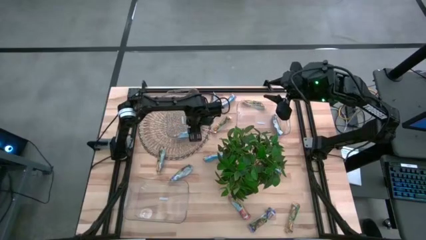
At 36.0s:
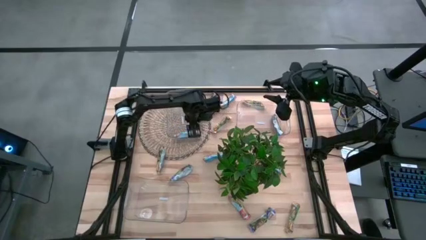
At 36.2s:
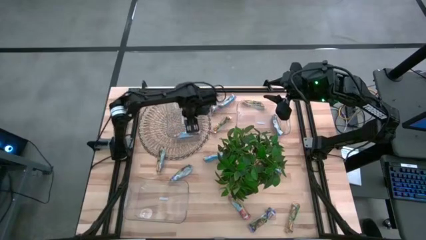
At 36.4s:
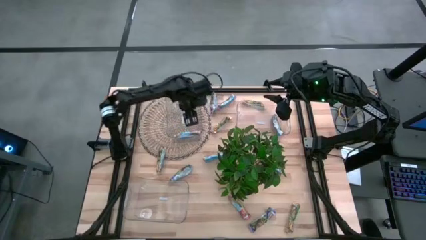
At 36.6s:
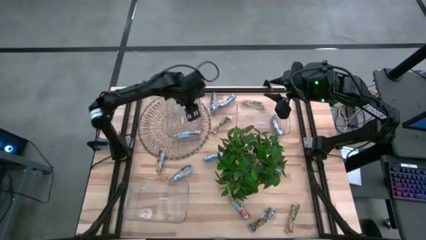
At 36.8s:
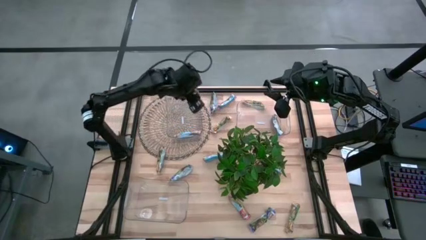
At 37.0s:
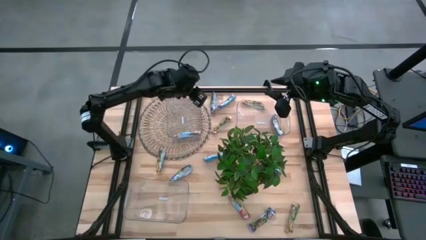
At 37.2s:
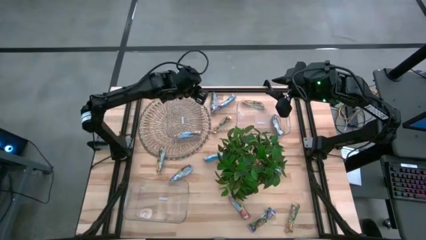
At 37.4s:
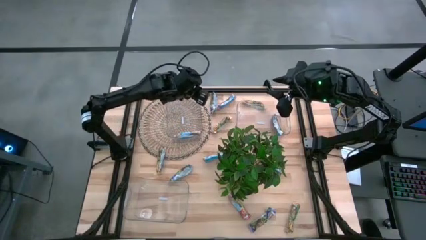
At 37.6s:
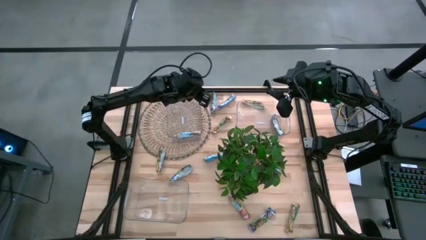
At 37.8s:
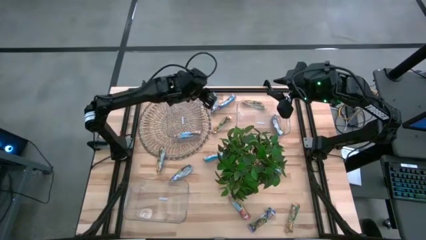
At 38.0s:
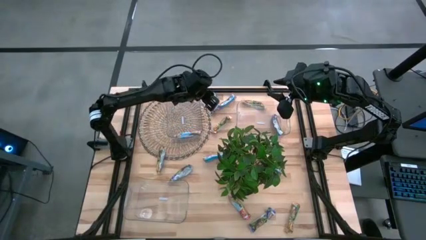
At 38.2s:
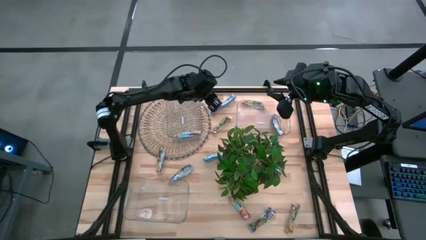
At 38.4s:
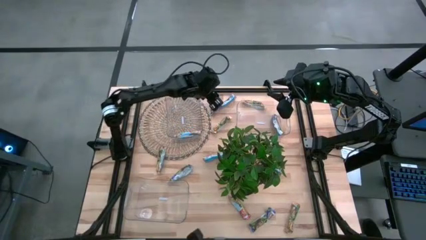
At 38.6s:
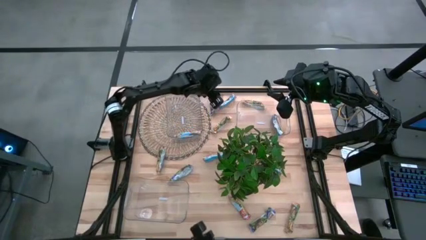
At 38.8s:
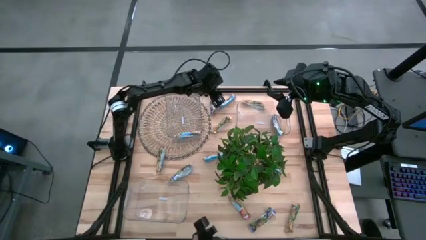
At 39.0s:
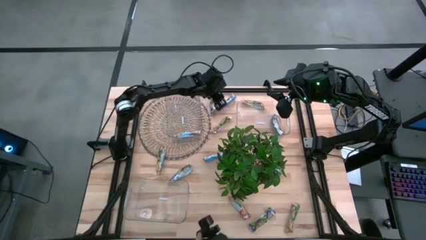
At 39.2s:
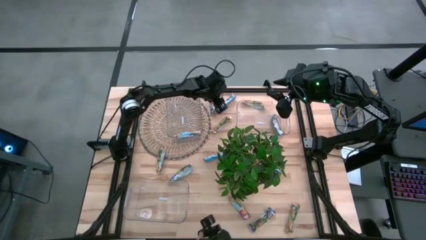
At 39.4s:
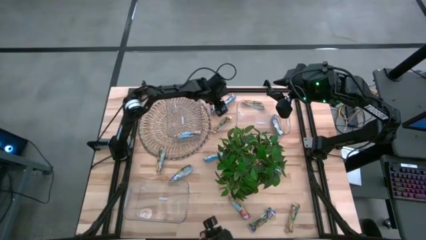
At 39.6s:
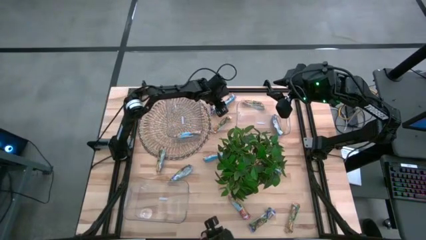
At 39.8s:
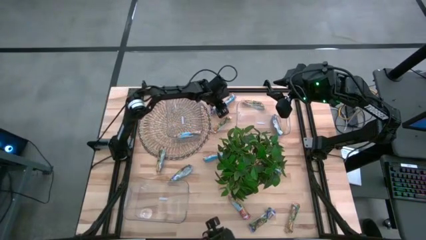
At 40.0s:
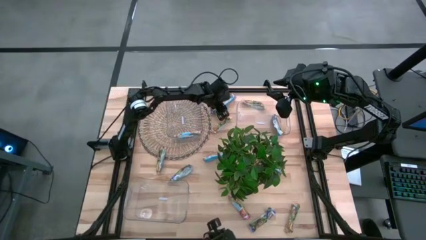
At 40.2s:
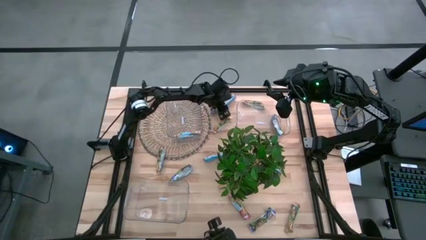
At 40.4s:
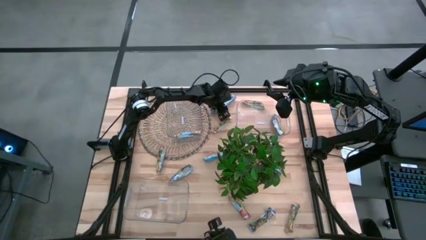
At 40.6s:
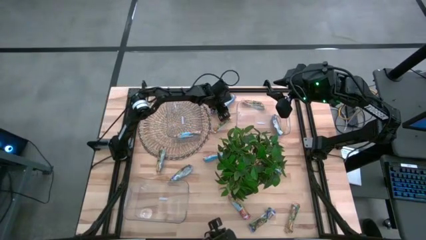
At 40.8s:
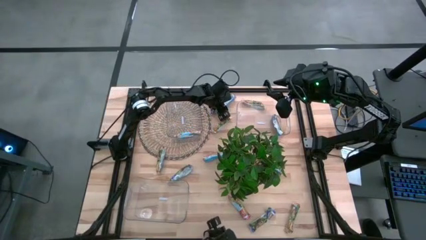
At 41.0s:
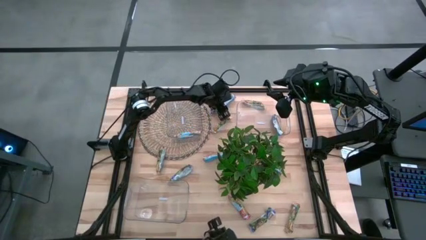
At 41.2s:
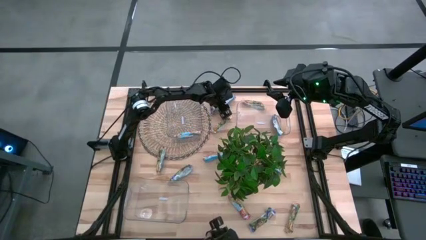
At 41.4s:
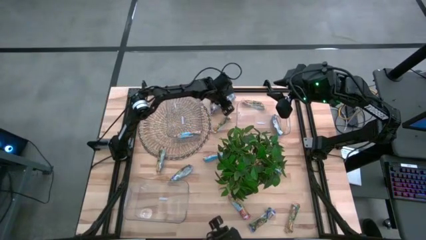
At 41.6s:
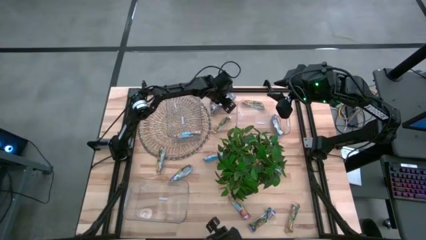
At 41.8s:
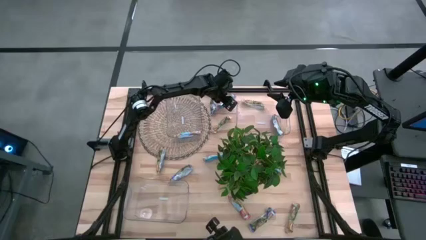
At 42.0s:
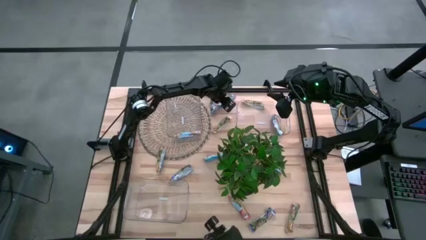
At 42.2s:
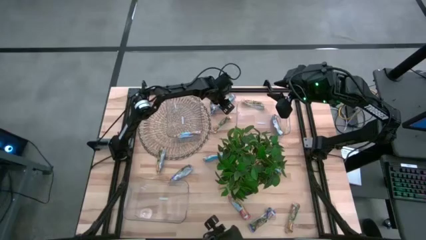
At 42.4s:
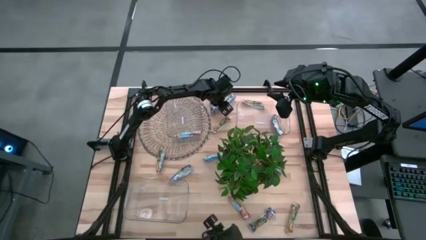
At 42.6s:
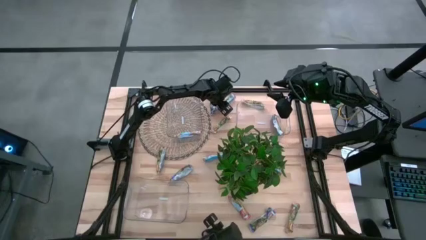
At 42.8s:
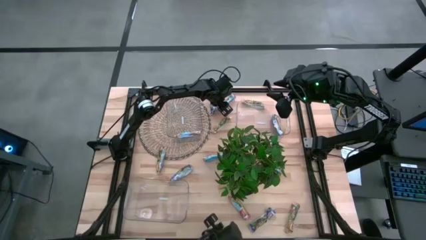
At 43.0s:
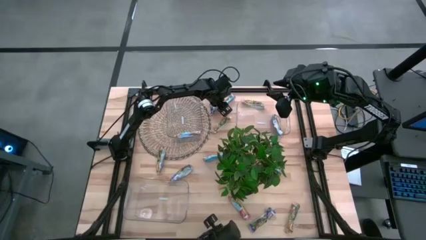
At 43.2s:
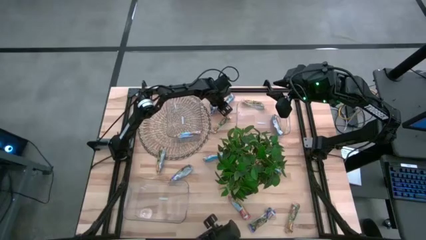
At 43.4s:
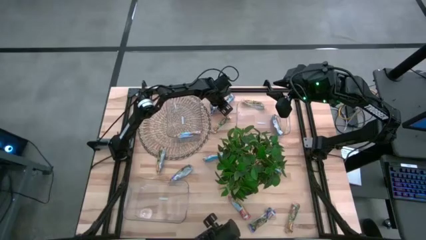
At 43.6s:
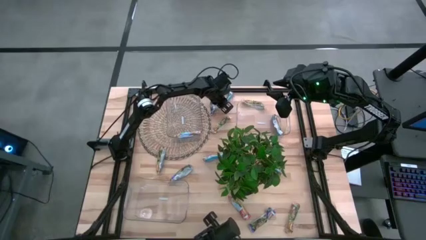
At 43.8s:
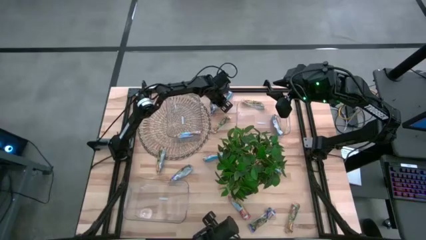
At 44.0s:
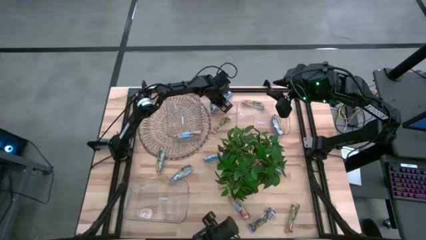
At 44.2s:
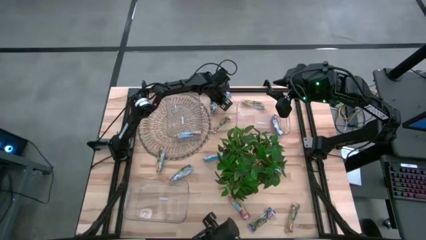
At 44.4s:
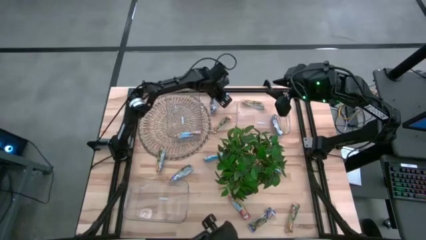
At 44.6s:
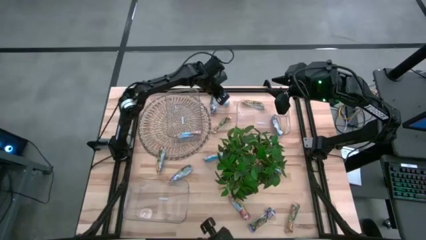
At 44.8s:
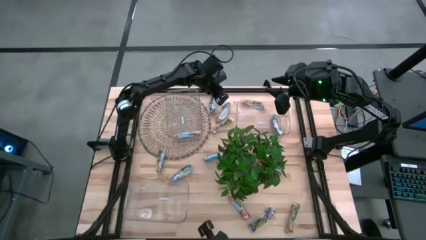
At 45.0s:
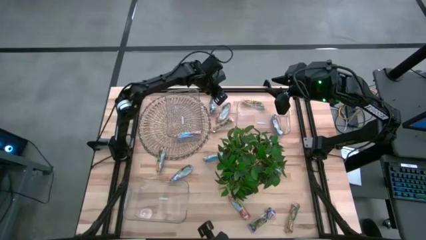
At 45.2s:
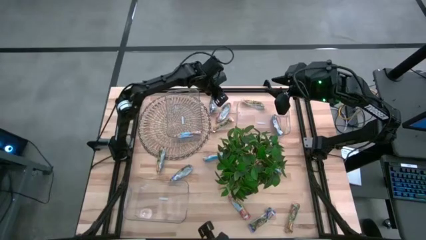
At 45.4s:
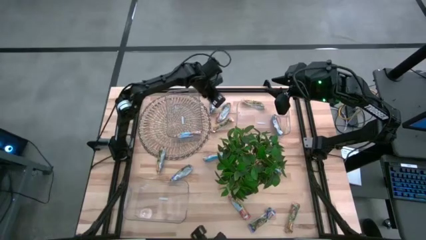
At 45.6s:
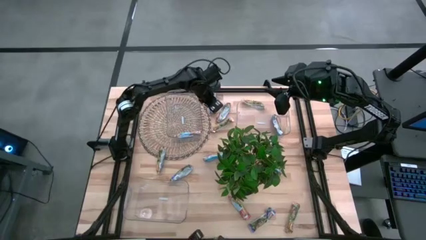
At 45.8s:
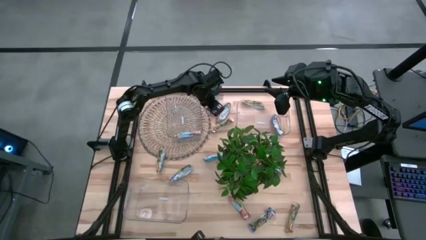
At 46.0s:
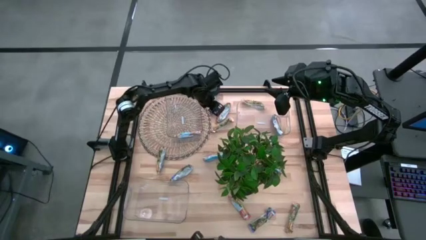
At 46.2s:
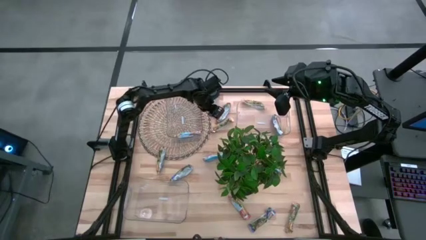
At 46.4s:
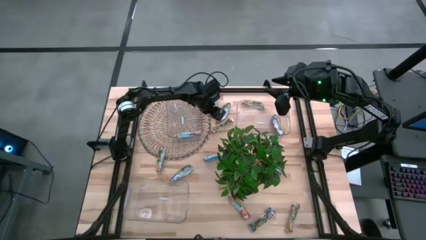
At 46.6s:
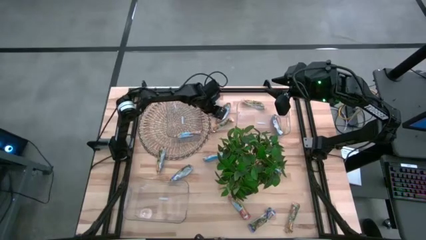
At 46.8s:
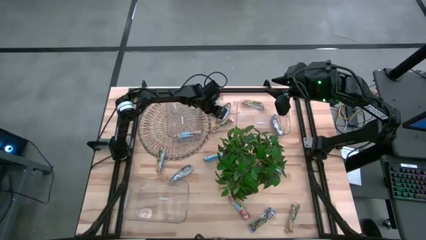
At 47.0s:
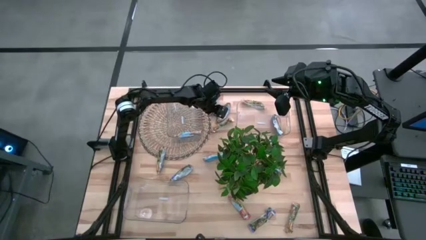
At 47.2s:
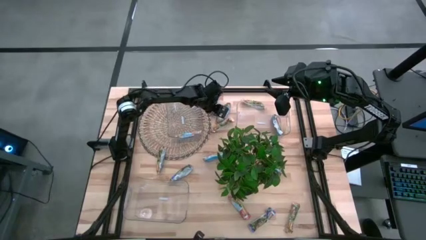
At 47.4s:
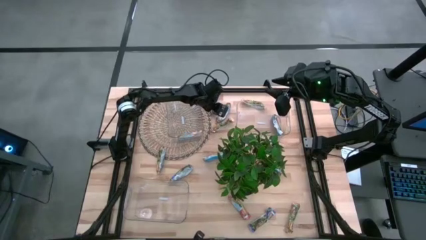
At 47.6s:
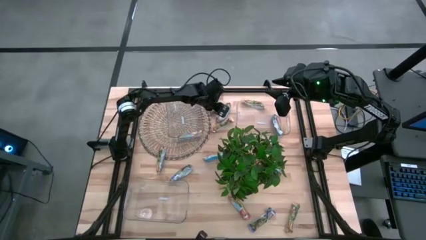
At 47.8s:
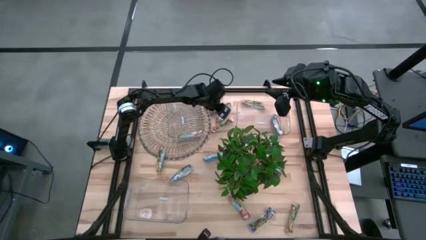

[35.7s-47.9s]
Task: Pick and place Granola Bars by type
Put the top red granola bar into the top right transparent bin

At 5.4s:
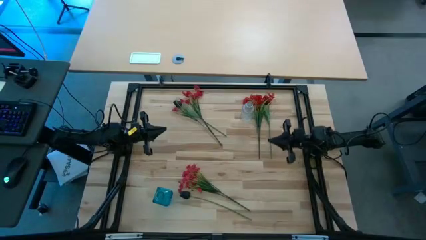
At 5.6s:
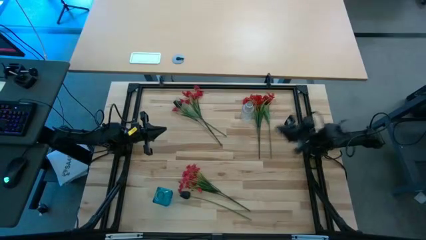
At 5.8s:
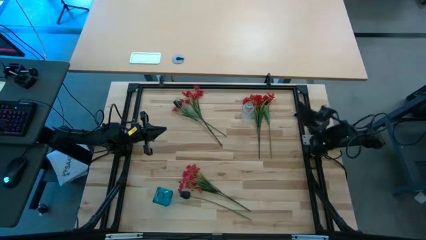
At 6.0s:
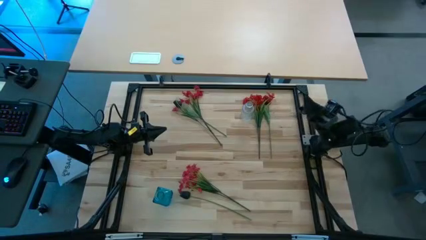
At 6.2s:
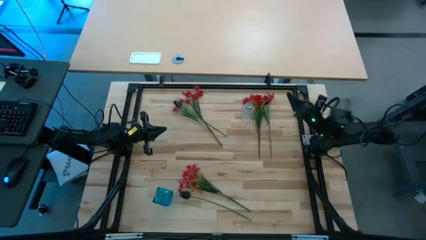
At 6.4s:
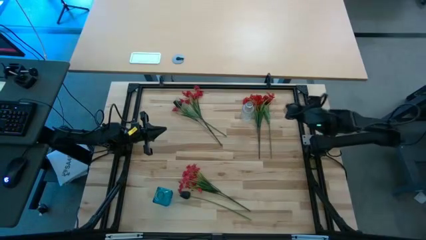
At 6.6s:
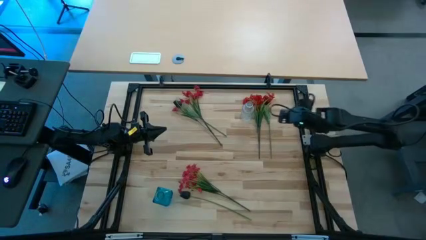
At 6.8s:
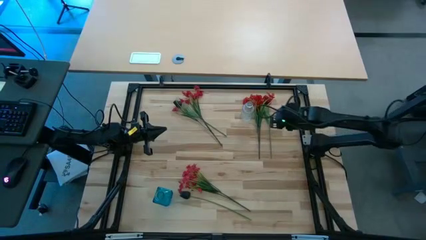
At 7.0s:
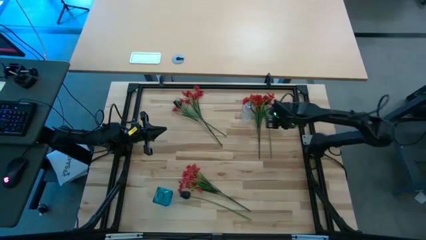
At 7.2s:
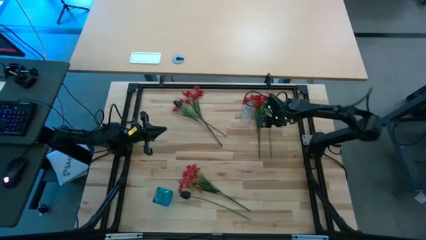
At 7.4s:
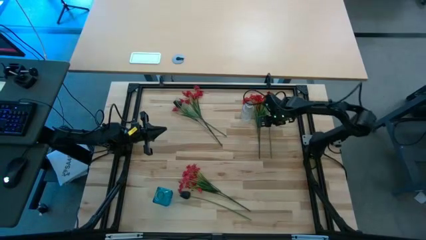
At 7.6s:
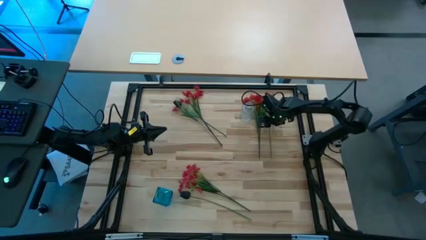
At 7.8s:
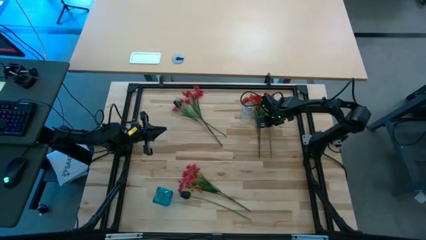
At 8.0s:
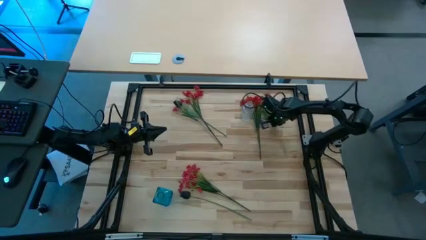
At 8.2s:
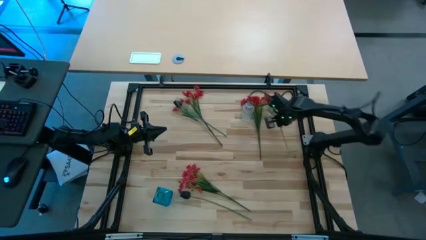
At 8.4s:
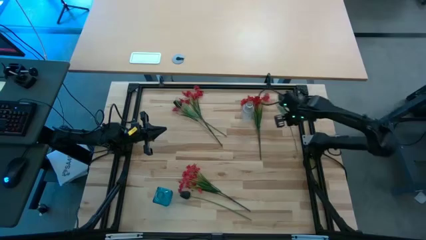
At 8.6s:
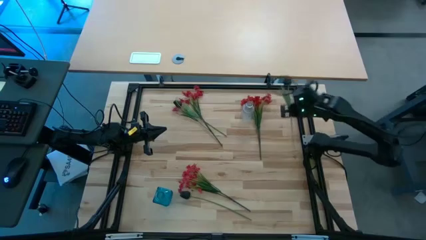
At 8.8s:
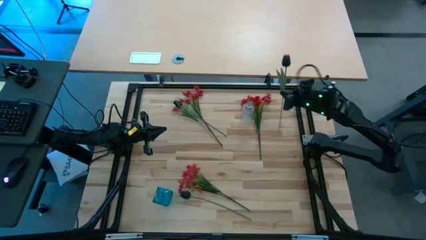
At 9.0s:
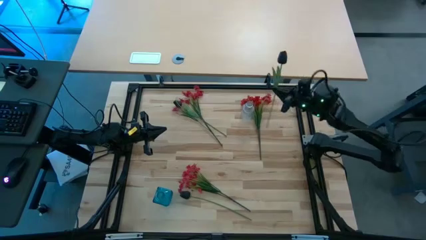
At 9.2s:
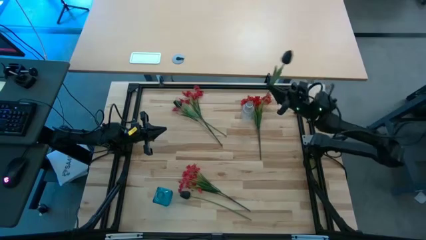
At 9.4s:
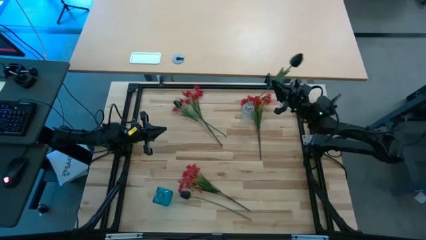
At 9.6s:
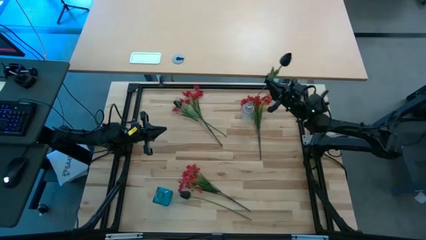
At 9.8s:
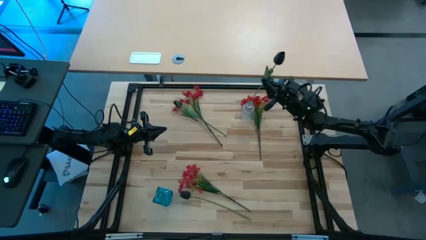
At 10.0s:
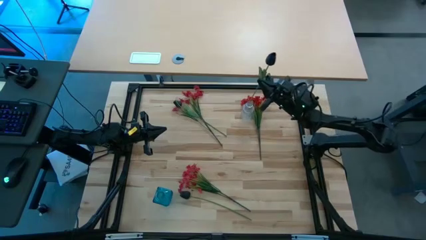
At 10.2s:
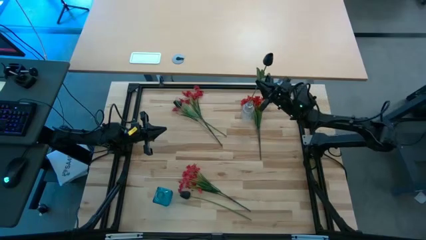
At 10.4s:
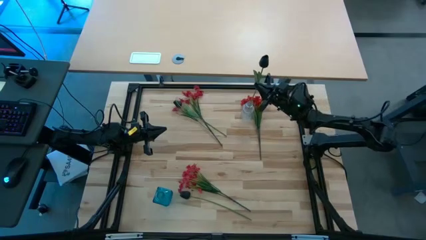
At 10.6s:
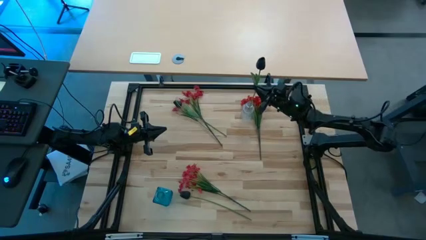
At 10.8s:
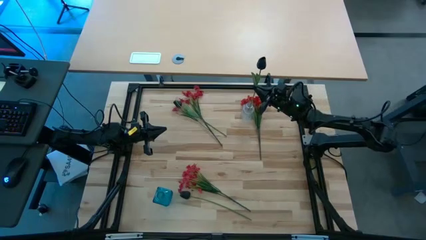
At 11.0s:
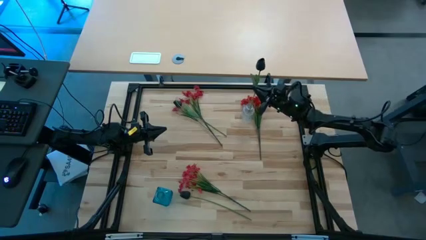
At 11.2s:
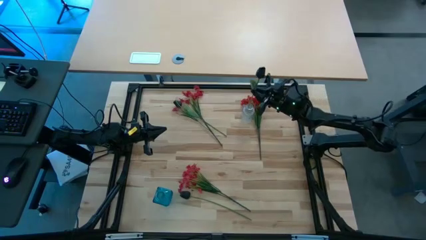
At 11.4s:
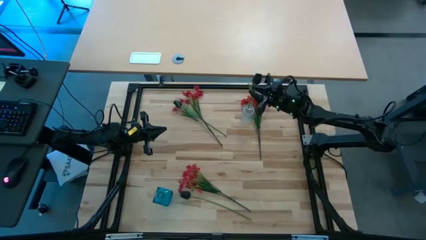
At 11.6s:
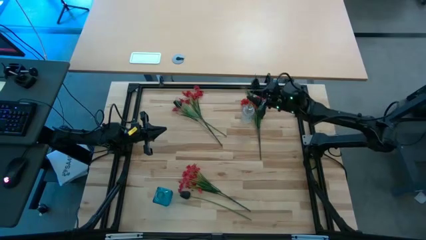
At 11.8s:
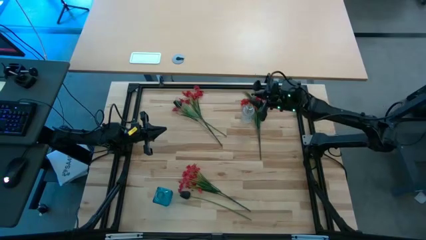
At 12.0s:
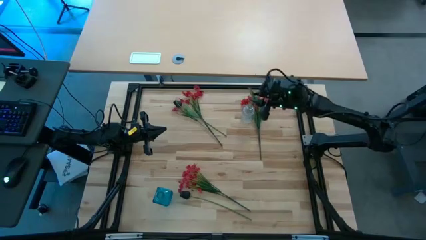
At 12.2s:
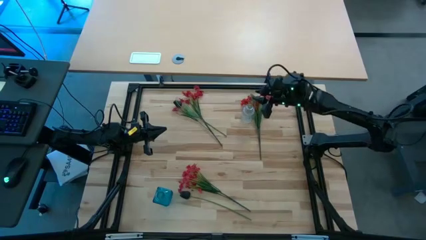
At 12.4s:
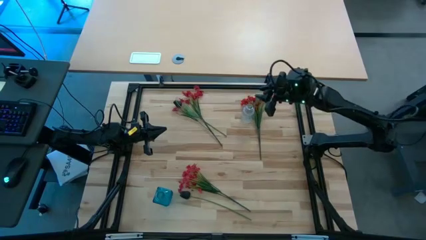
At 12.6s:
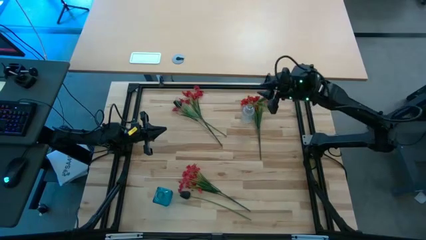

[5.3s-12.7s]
Task: Sort flowers into vase by color
Put the top right black tulip into the transparent vase
